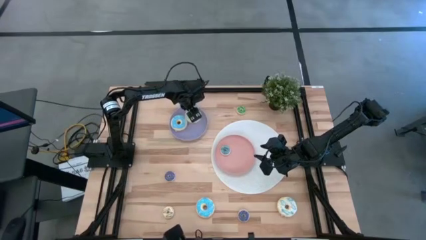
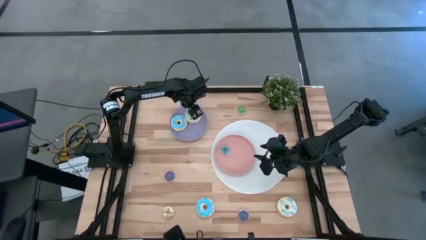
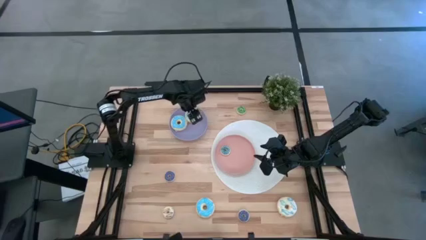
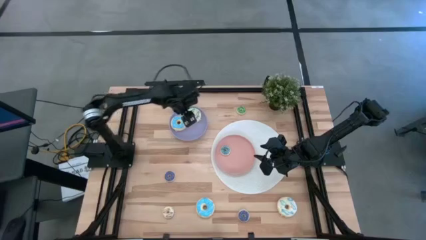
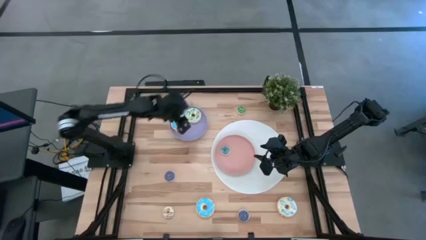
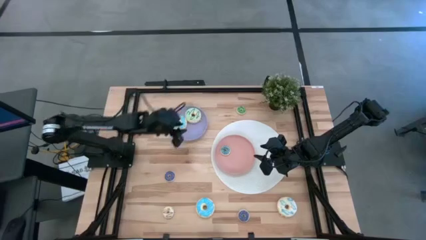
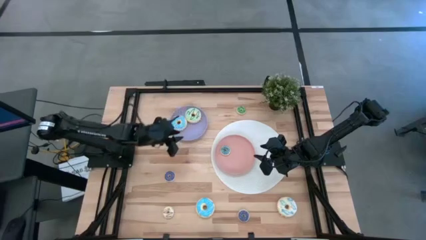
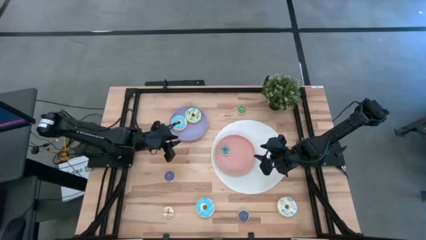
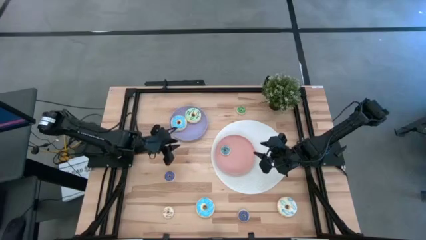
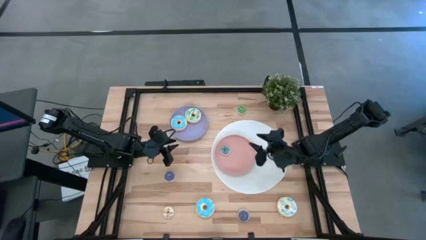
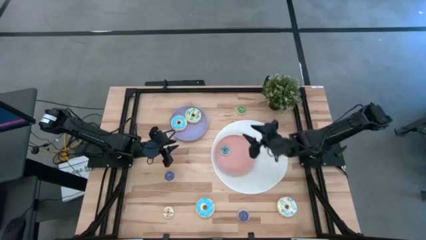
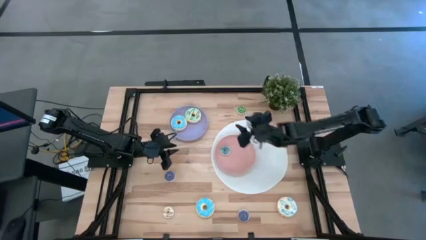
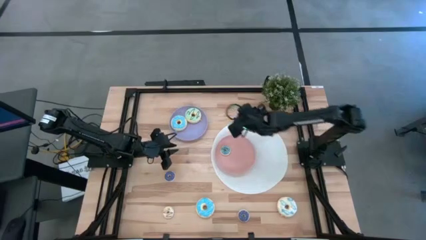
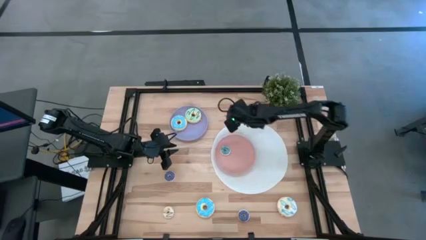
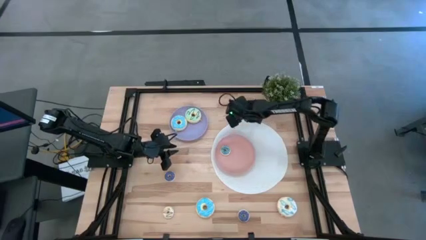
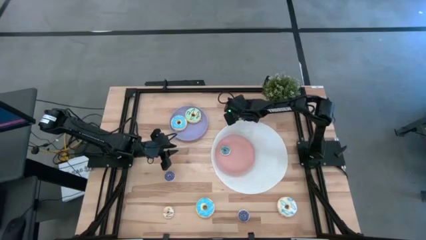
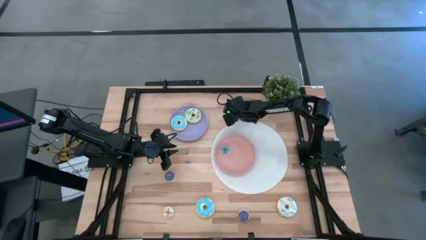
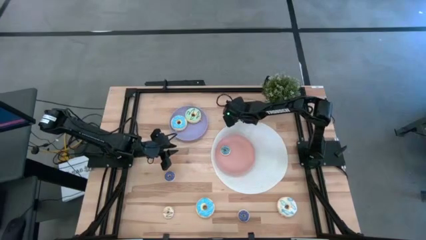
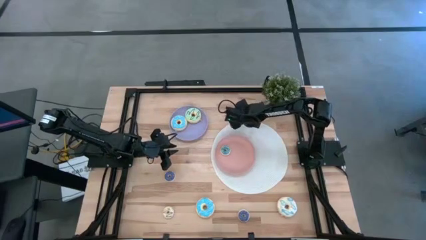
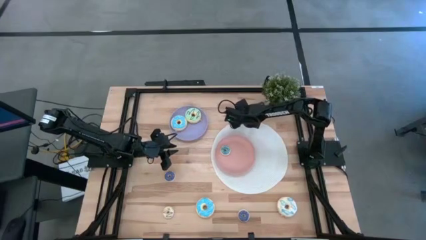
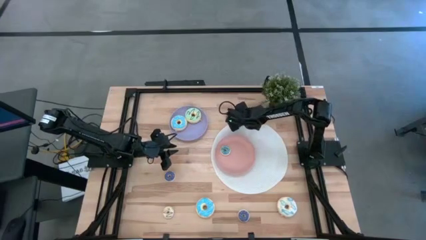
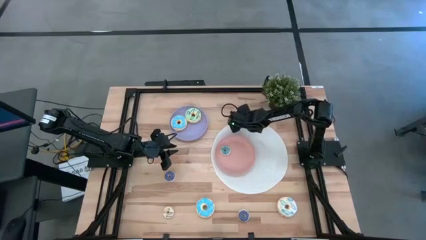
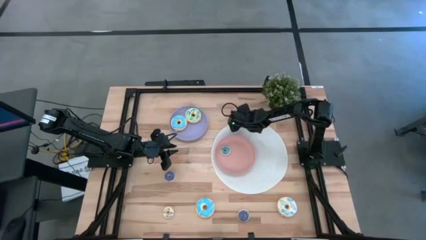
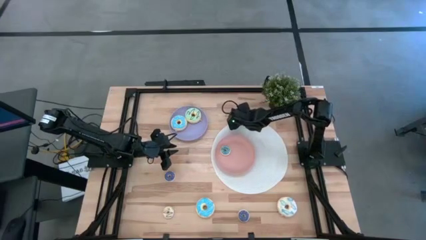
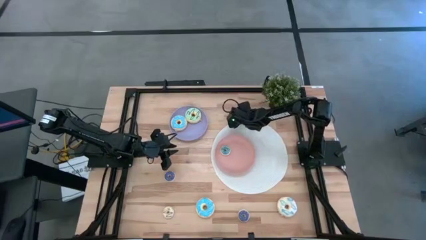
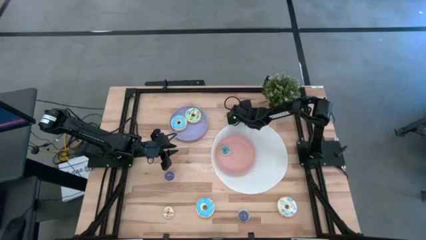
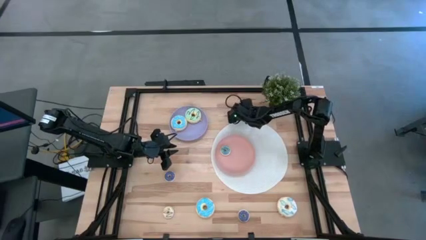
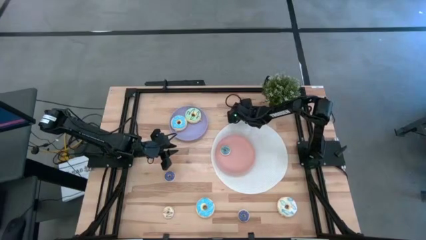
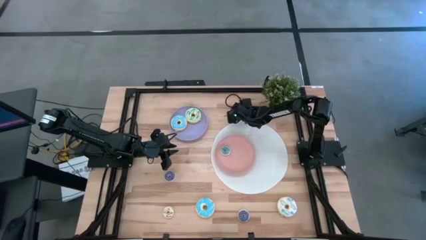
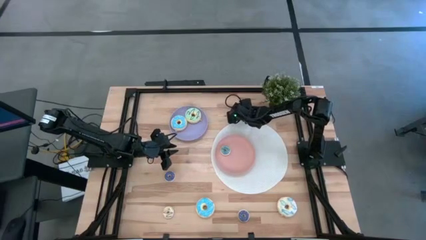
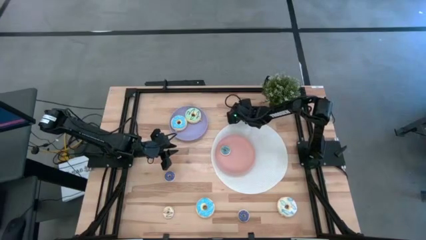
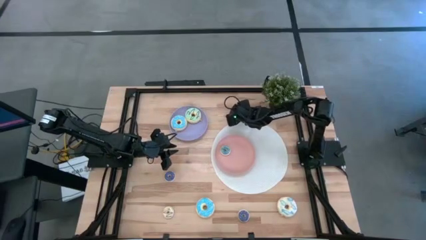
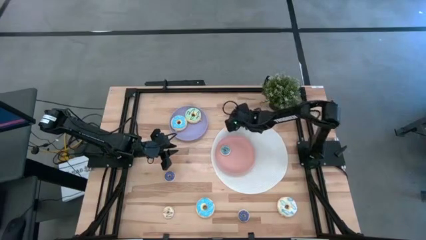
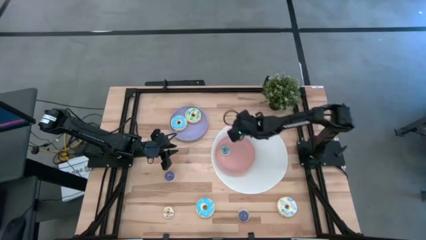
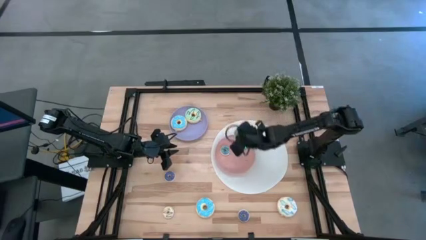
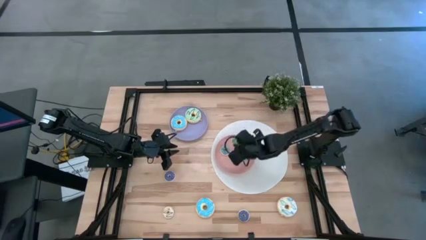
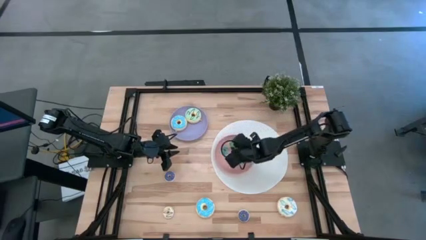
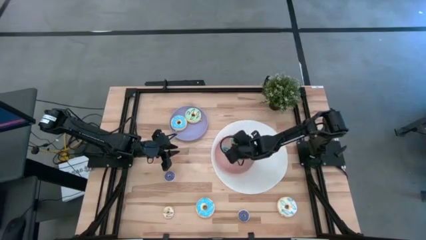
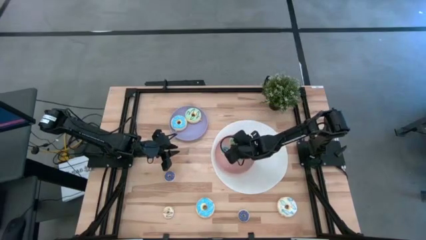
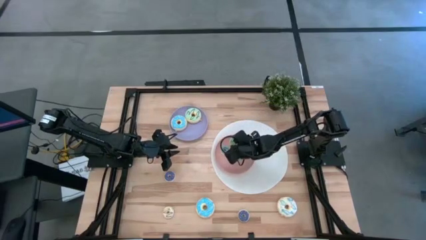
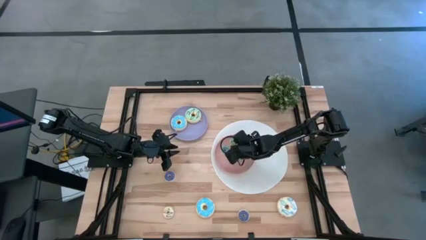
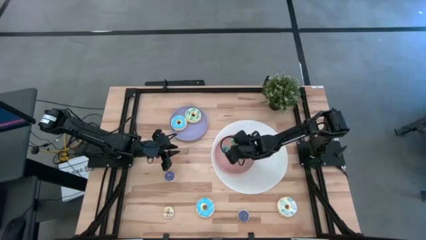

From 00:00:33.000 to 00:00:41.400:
Task: Pick & Place donuts
Put the small green donut on the pink plate

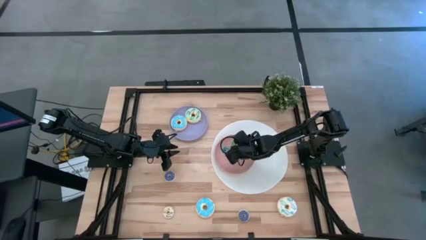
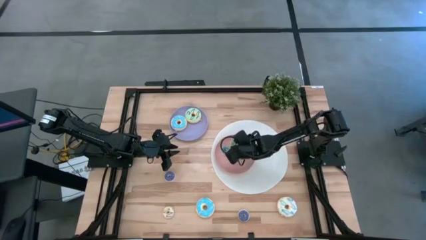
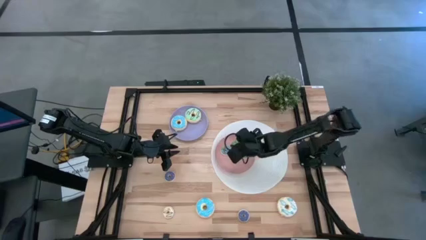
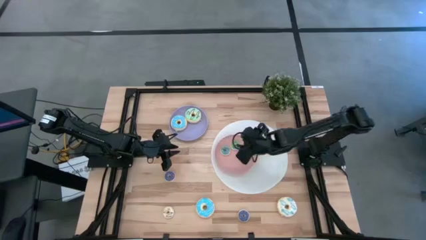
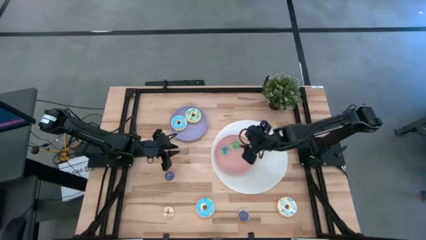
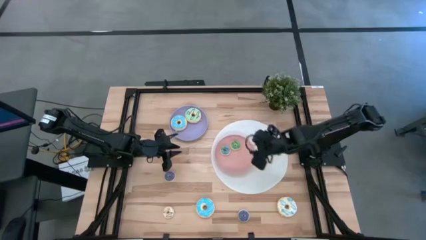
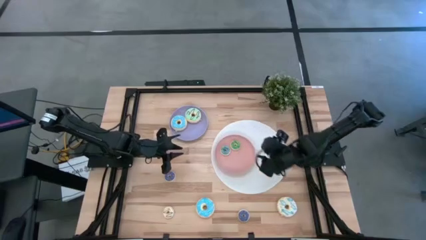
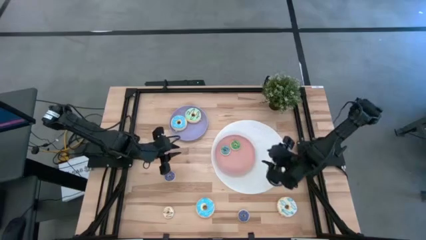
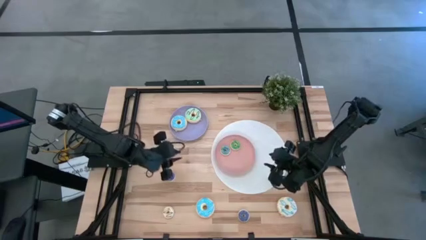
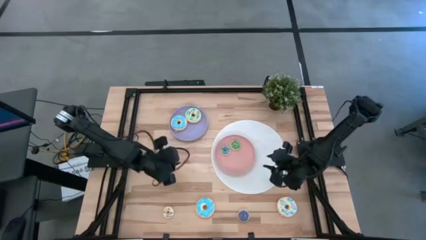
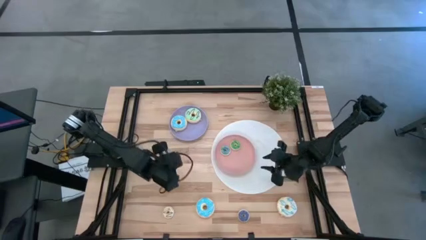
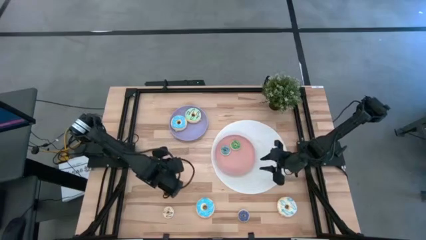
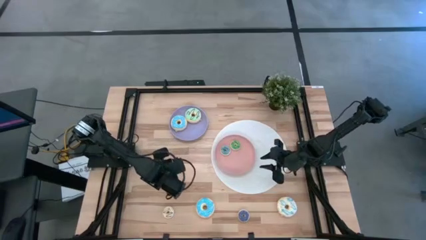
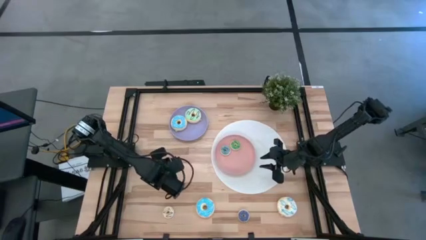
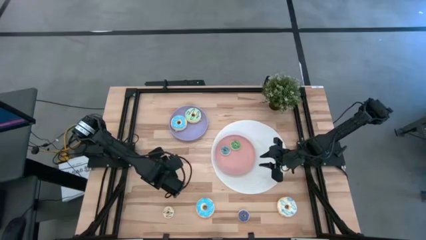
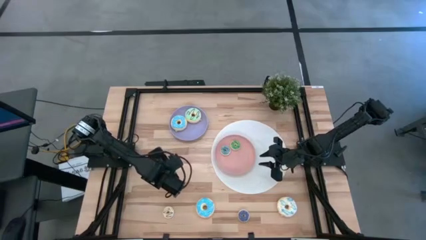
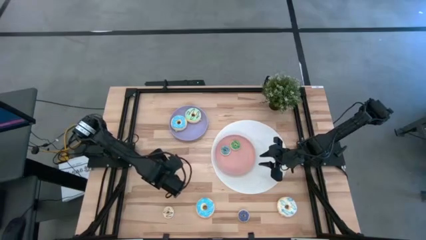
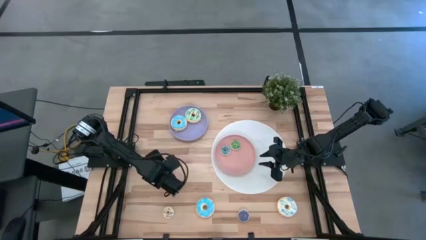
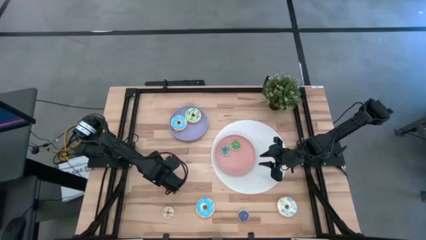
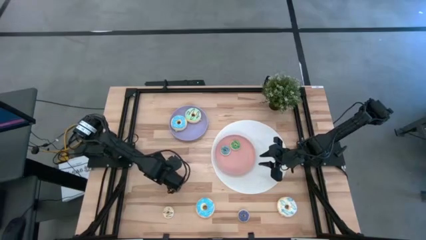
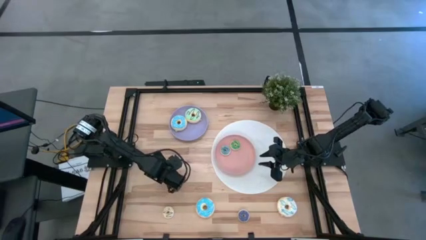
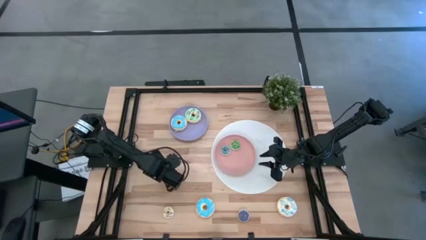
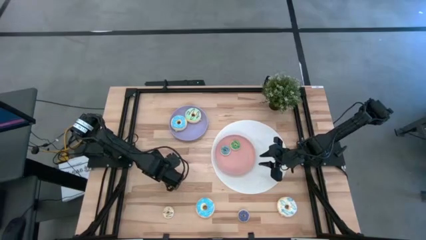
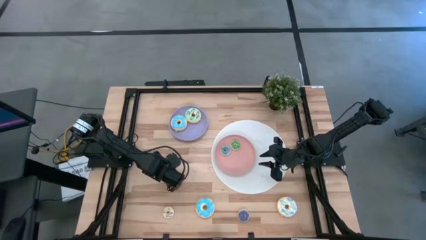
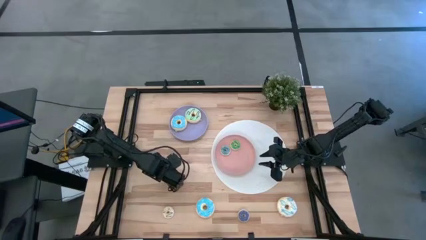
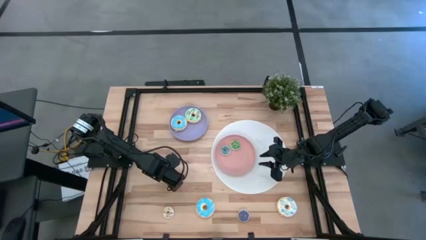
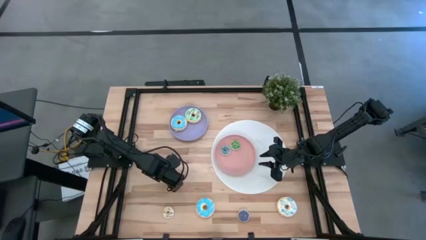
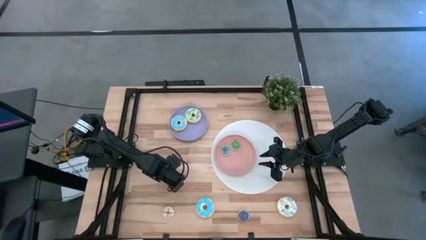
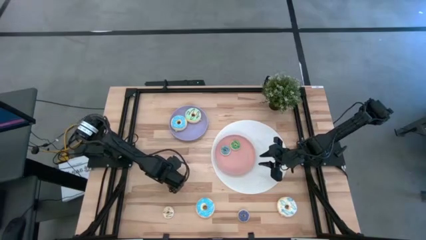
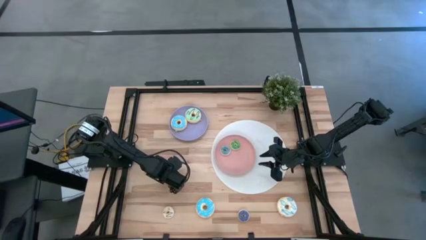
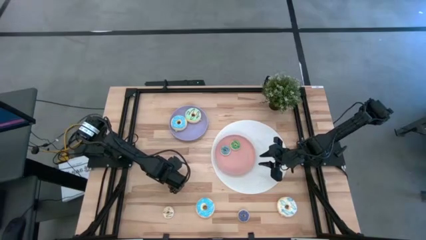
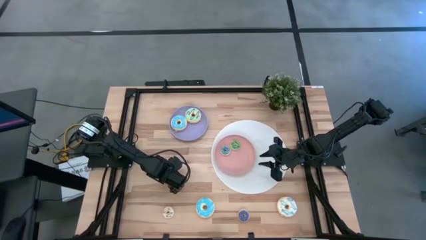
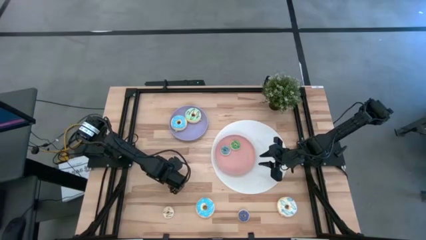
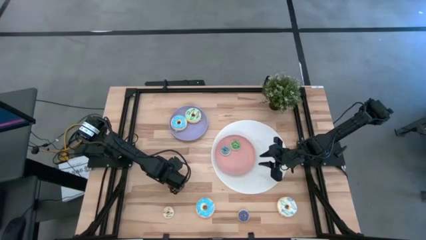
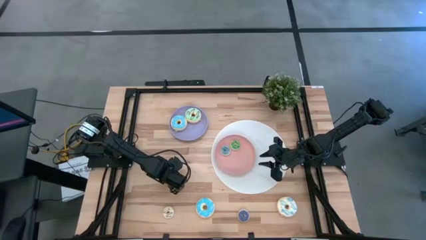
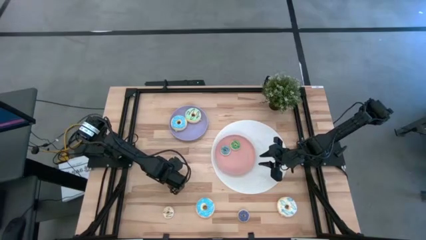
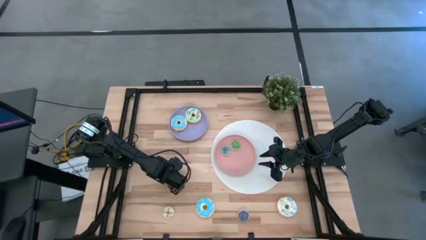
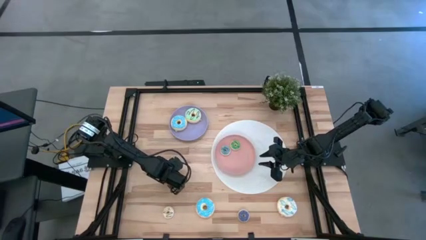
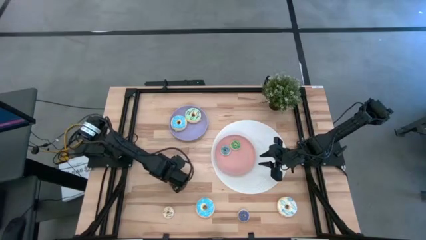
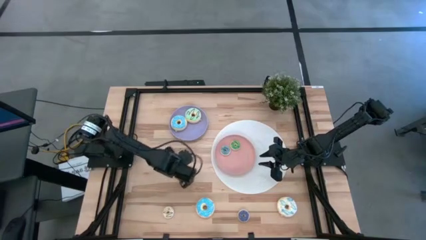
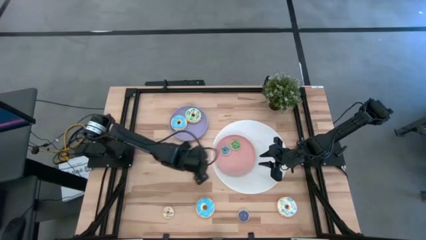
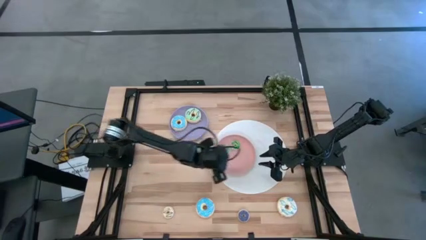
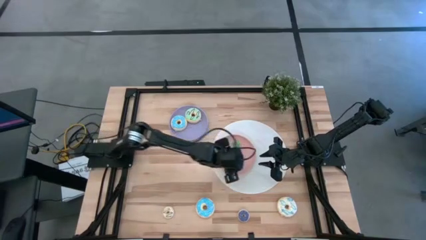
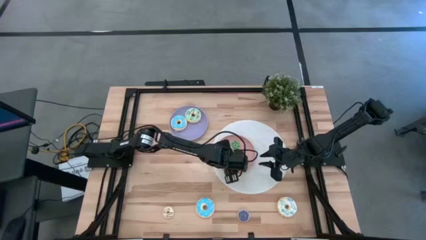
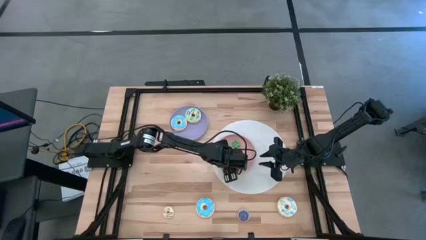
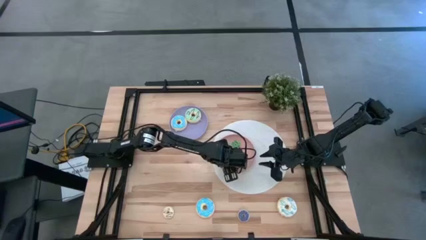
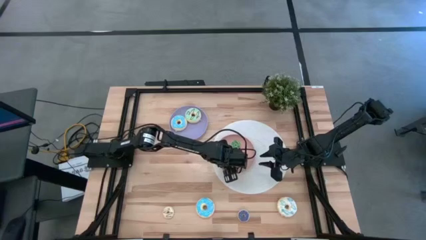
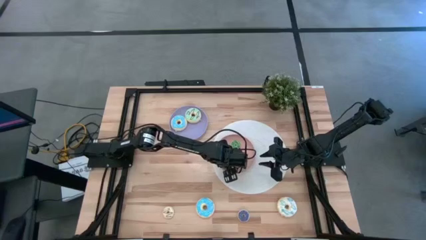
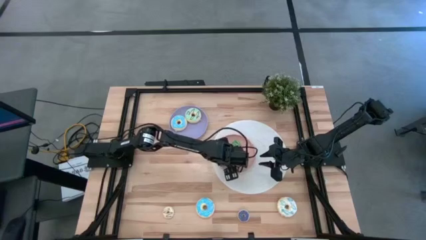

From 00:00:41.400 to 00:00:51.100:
Put the top small purple donut on the pink plate
